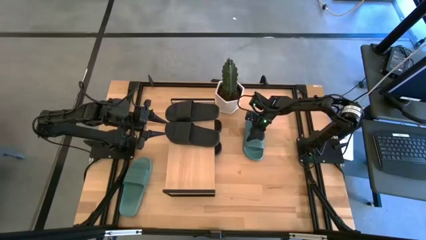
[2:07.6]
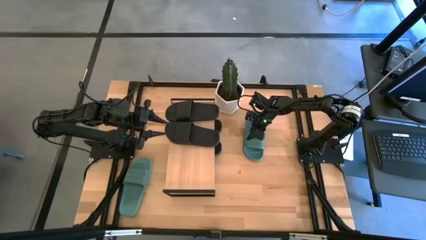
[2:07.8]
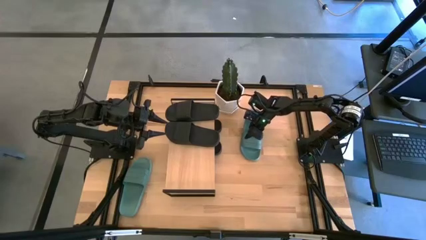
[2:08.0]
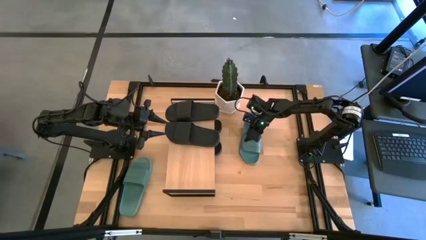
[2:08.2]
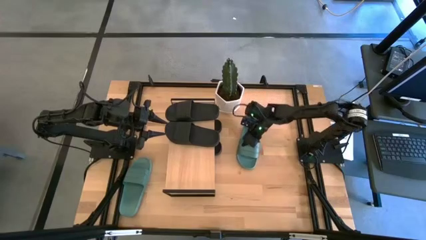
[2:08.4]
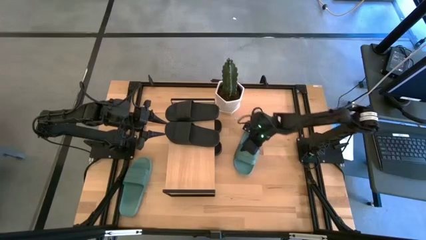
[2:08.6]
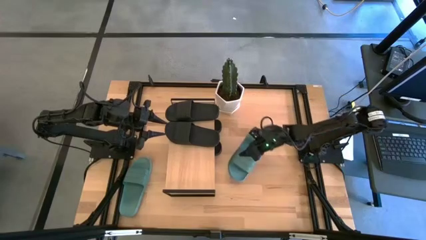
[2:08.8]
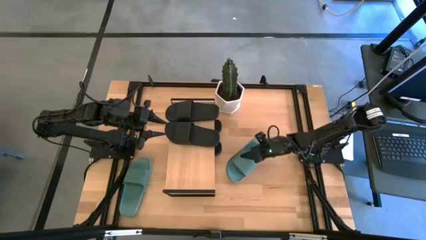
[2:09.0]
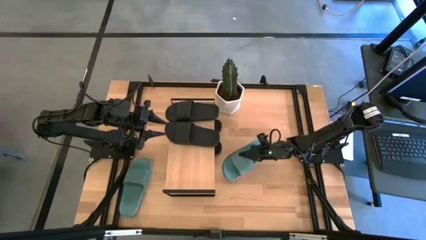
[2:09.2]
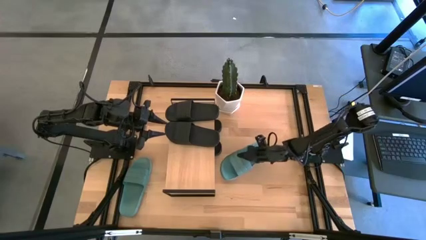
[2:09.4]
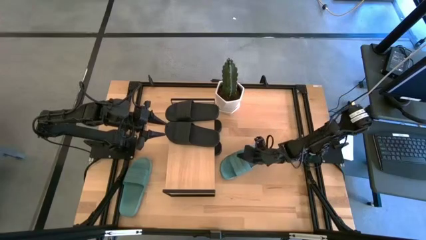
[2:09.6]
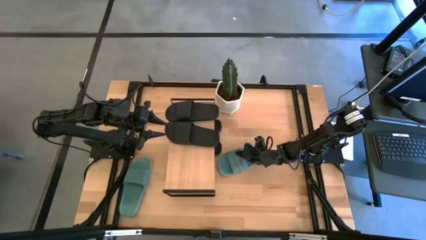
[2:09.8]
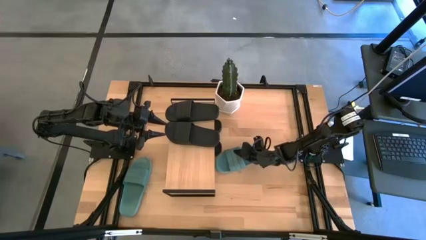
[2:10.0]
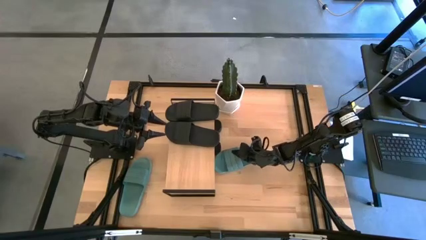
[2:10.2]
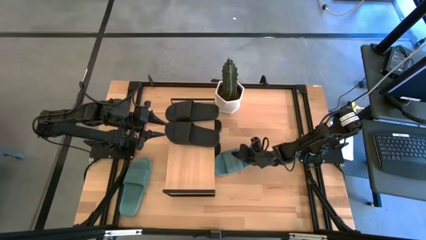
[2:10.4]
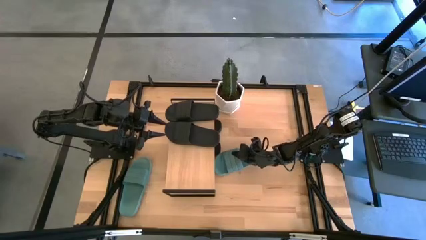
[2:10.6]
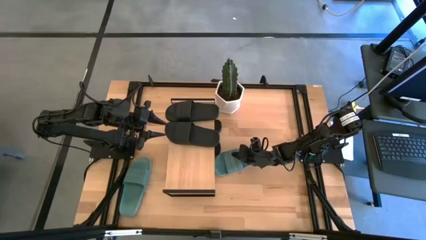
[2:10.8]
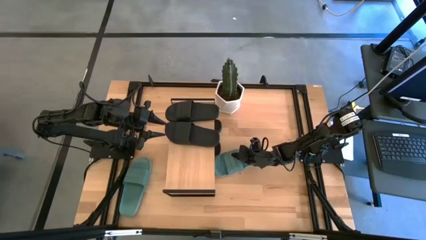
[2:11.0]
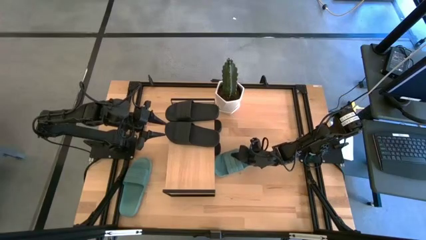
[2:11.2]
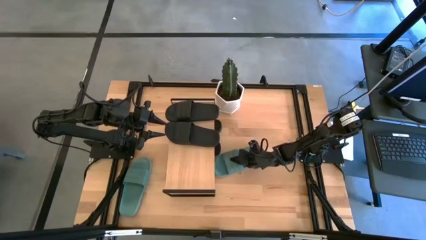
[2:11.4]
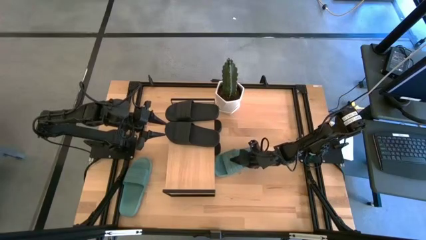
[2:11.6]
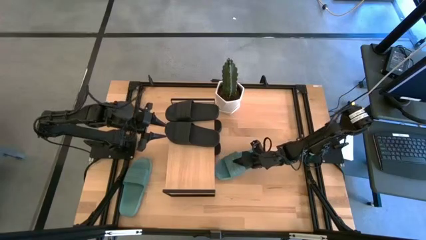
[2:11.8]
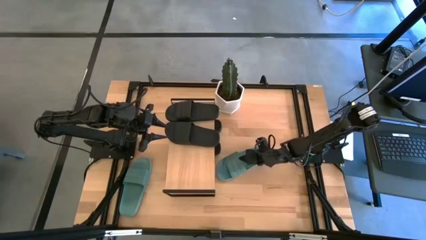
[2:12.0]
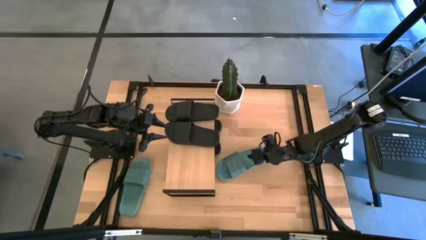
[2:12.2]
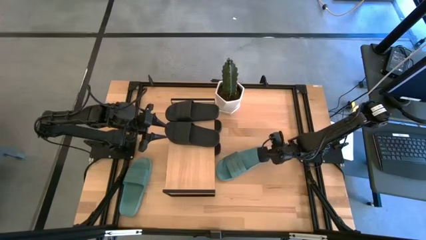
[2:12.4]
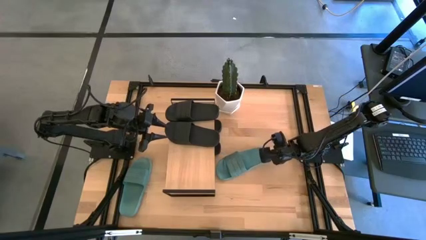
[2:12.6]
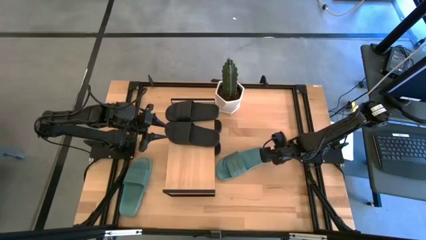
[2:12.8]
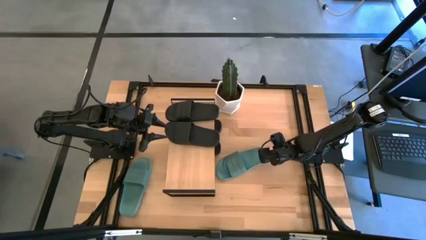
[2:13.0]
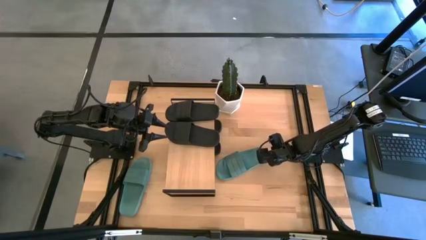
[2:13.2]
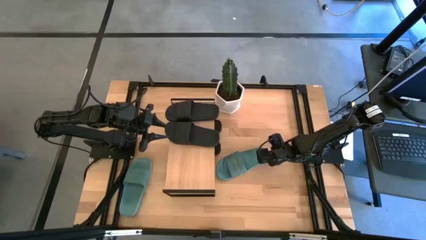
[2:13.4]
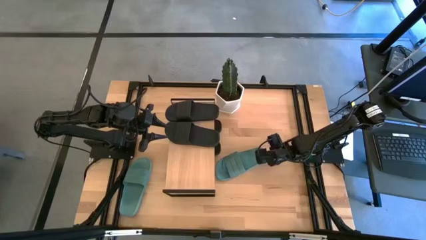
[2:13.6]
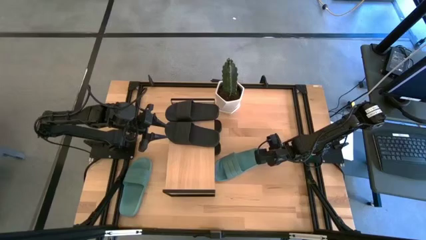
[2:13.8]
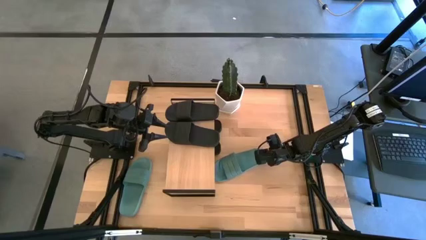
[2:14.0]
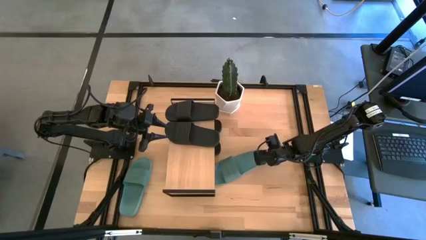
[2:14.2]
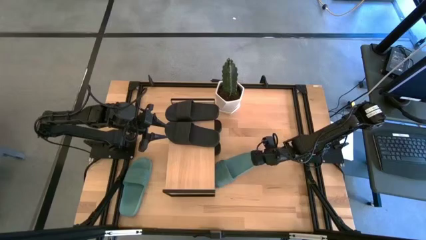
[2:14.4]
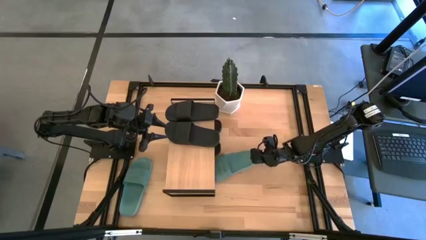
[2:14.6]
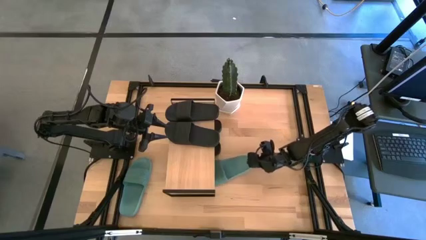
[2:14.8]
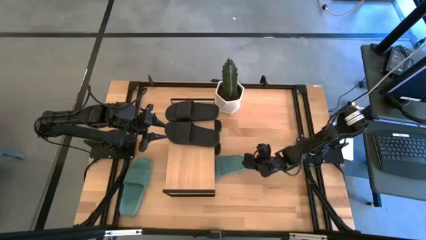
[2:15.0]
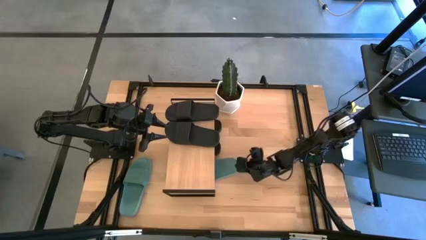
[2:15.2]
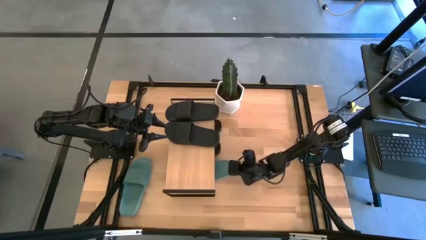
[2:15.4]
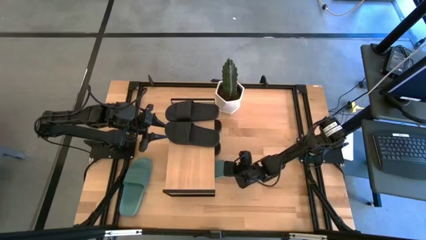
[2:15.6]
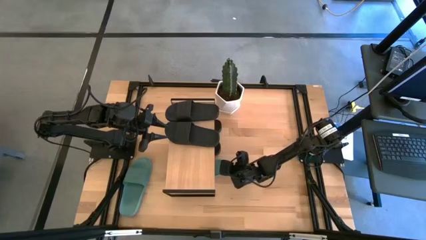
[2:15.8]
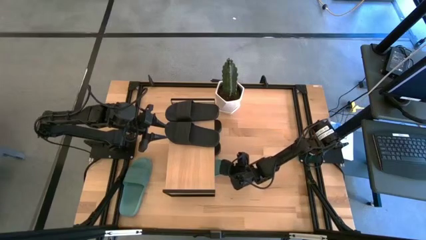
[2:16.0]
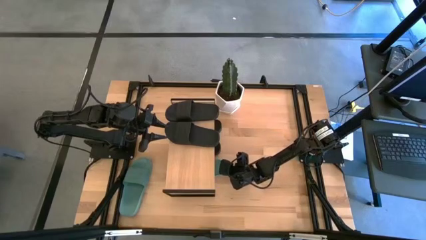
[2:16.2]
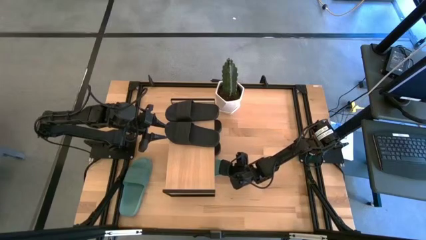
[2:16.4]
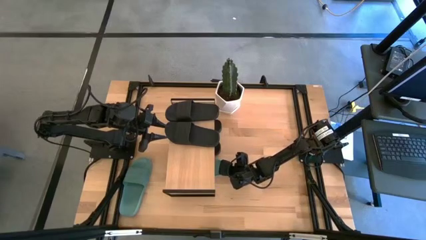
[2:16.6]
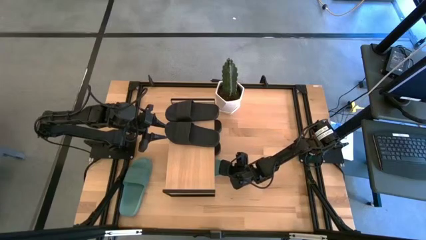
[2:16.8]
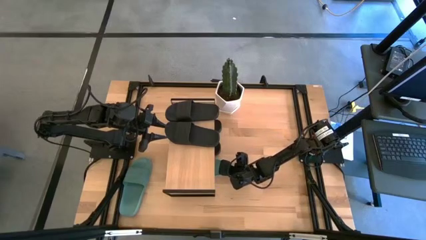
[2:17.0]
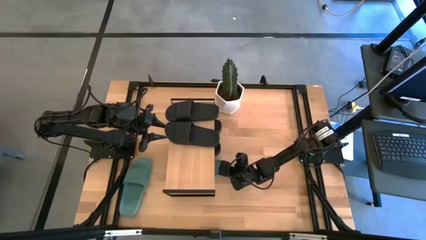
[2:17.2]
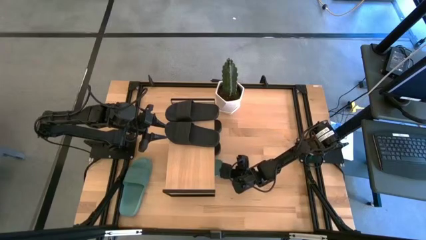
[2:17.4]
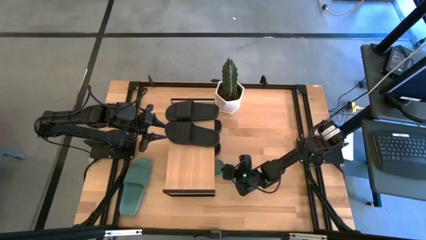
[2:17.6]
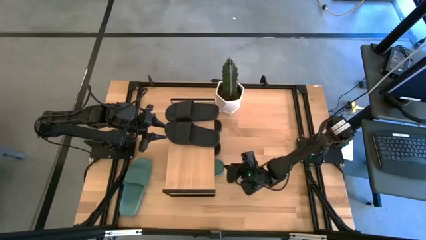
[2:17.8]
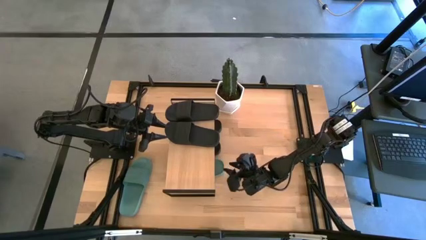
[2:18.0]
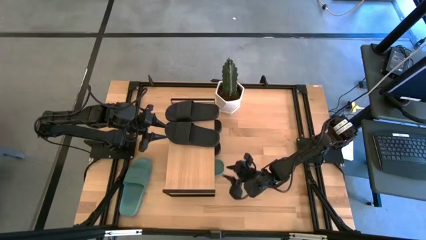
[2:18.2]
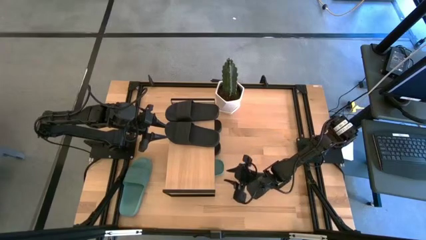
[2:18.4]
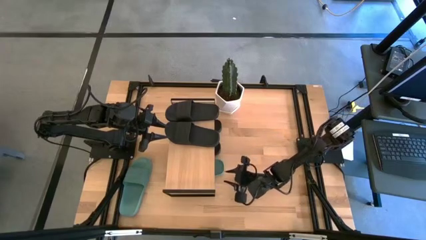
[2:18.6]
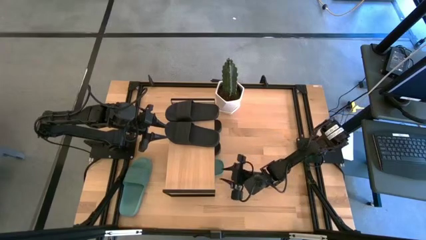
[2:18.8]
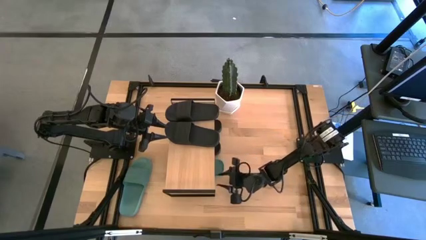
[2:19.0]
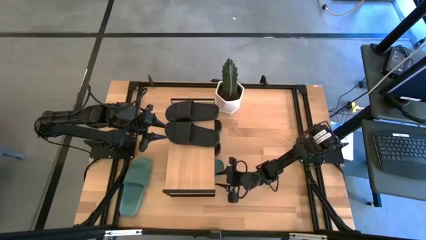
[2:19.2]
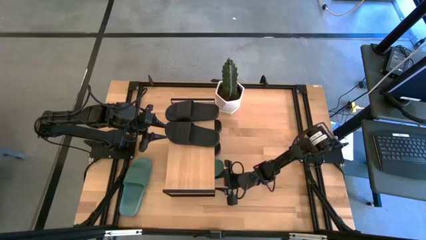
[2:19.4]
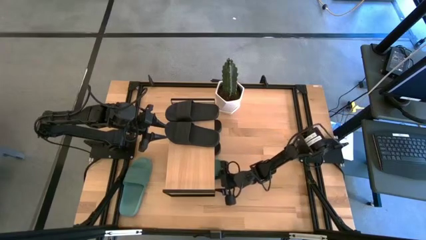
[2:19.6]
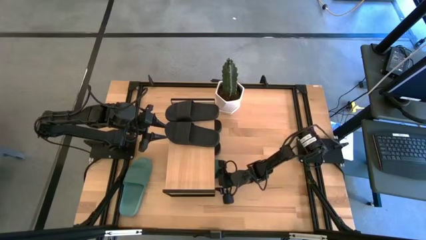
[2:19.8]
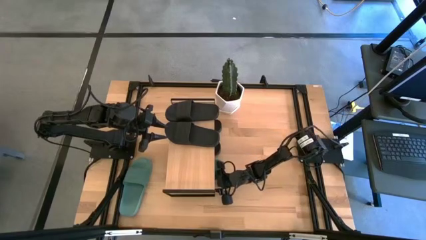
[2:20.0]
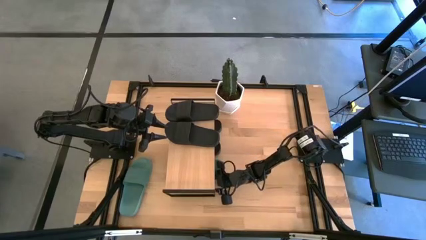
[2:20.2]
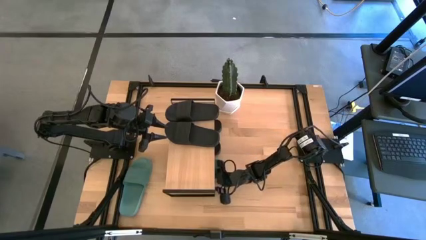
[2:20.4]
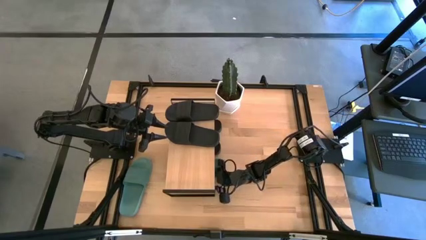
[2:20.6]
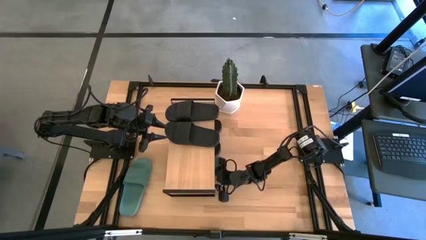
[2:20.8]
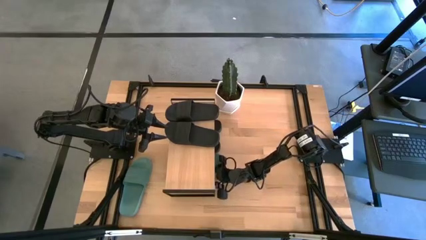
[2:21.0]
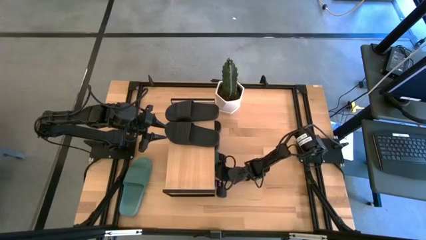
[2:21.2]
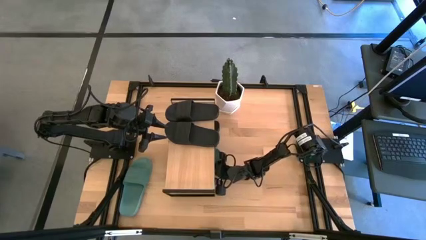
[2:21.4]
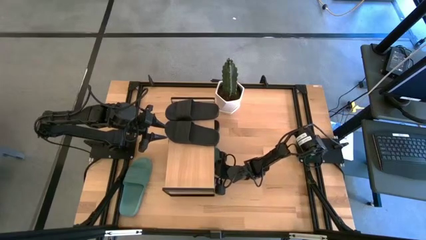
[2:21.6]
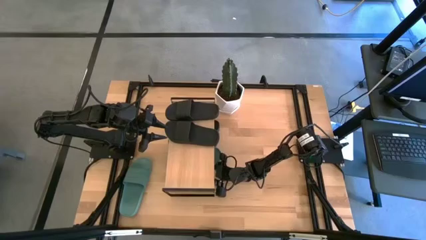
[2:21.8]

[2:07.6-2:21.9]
Task: Pick and place slides into the shelf
Put the green slides under the shelf

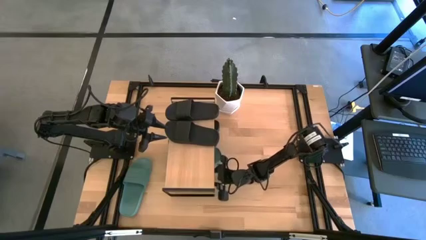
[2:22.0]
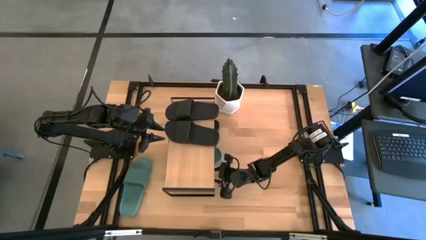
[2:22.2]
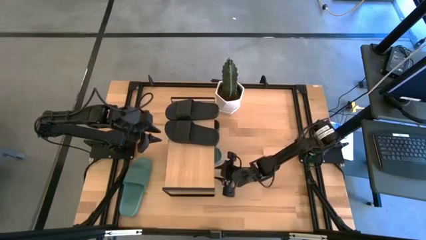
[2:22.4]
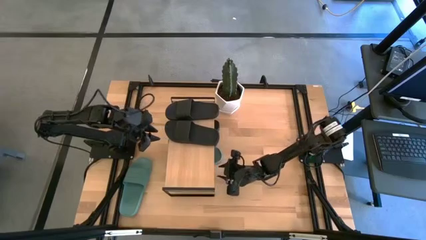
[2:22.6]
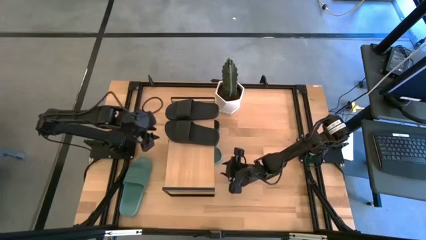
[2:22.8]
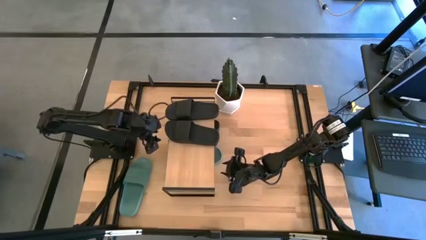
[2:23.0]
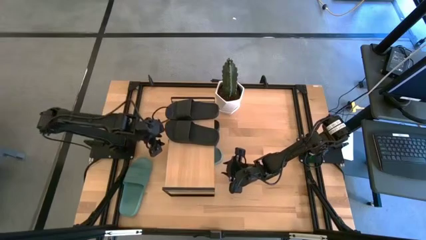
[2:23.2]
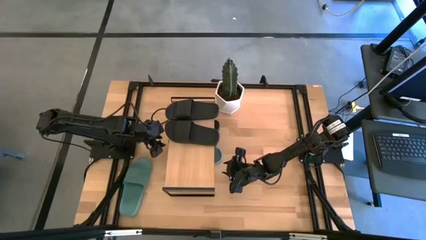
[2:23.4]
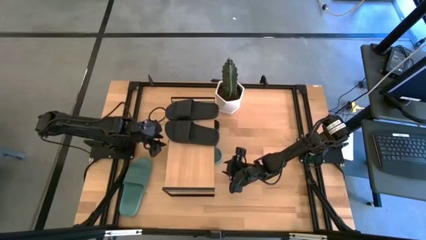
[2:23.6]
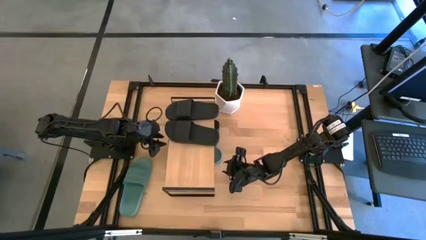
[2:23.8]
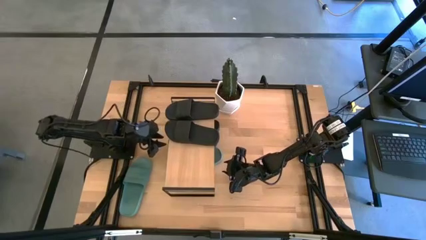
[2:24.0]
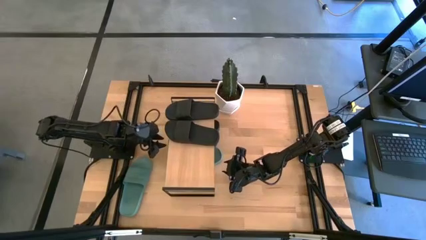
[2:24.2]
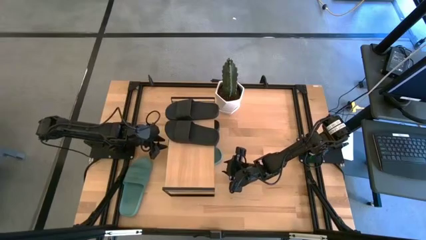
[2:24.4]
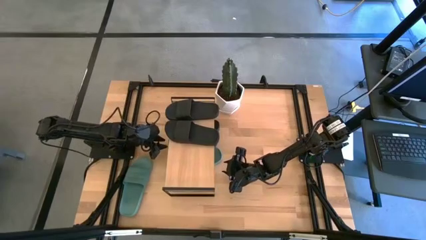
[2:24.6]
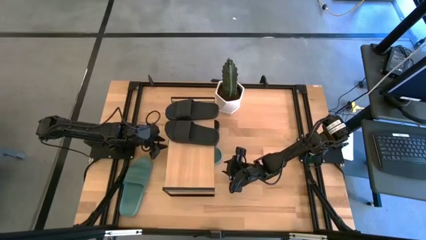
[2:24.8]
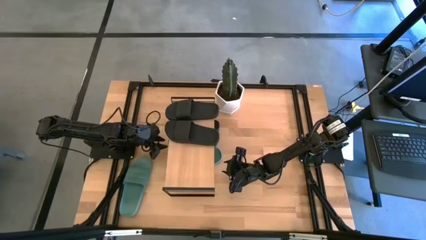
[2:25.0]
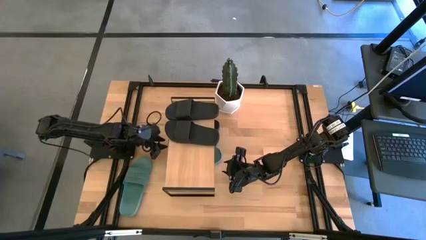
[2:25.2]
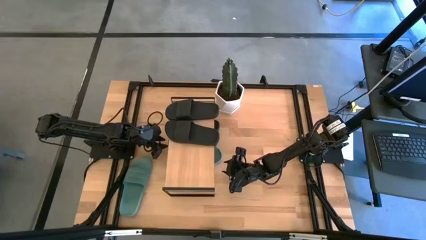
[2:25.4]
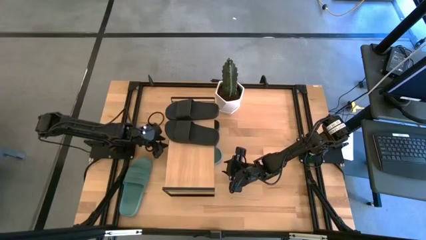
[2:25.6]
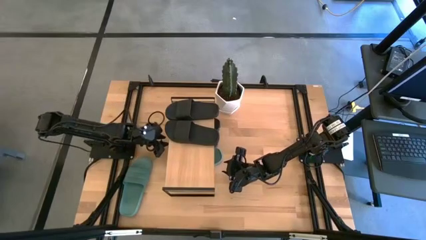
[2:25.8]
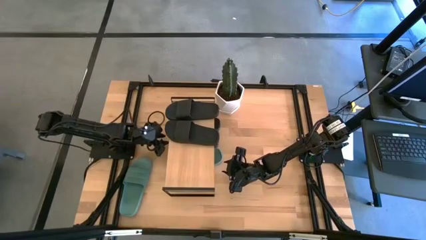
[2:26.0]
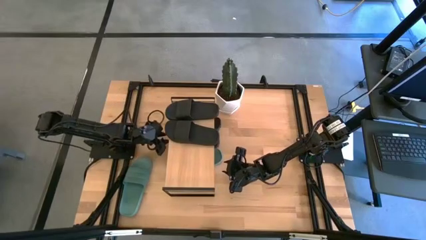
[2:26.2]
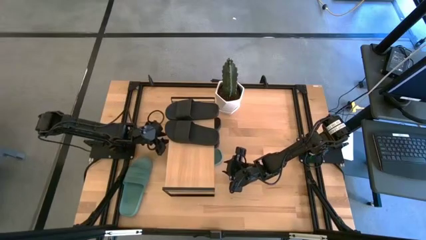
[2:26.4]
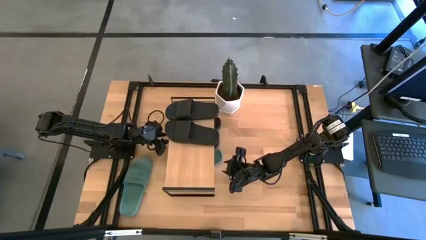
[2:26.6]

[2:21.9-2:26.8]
Adjust the black slides under the shelf
